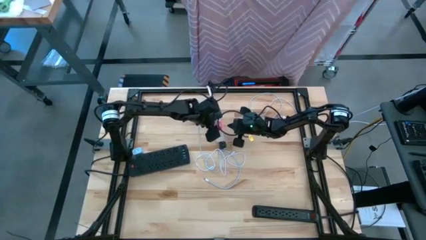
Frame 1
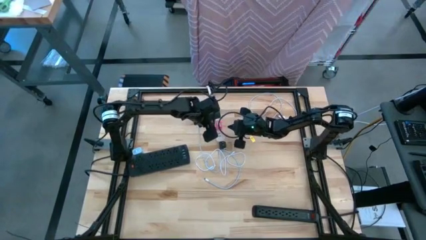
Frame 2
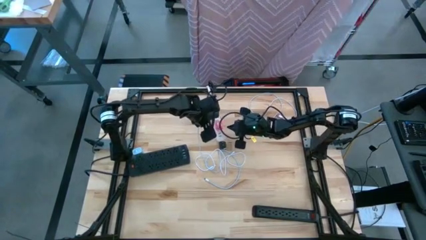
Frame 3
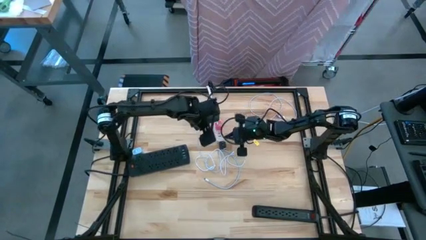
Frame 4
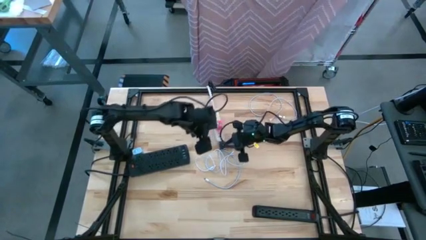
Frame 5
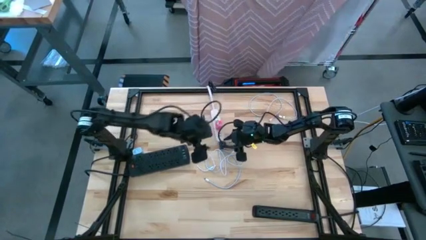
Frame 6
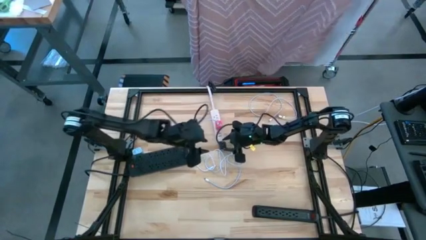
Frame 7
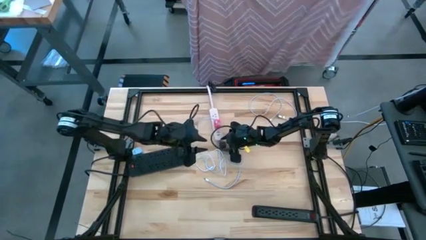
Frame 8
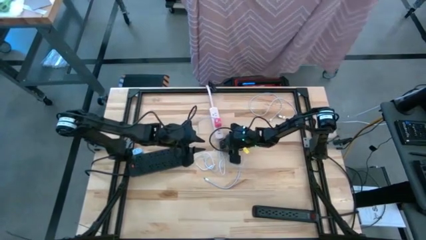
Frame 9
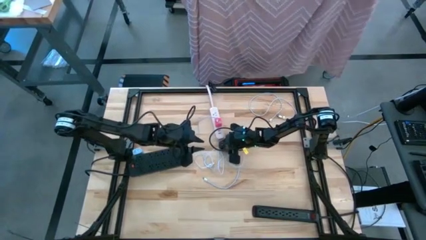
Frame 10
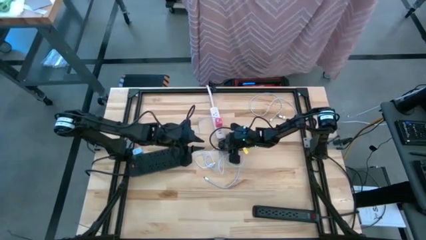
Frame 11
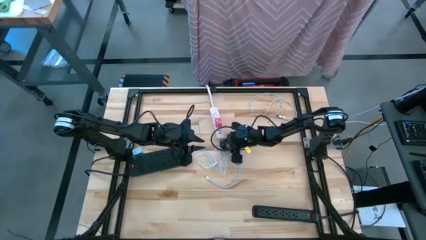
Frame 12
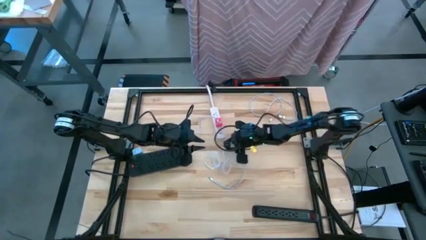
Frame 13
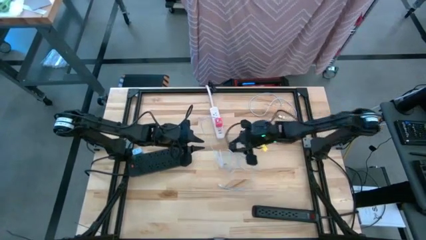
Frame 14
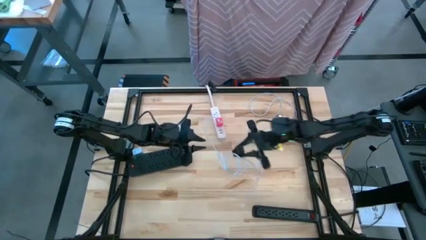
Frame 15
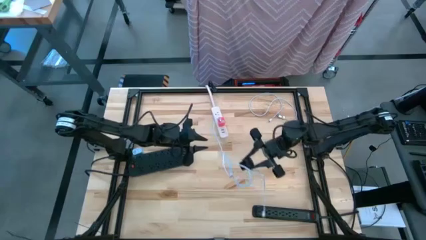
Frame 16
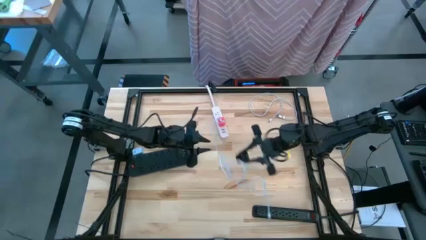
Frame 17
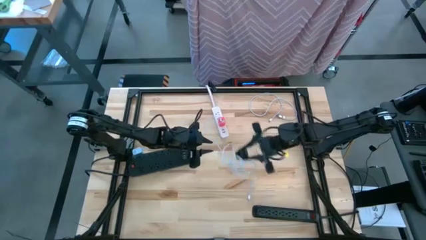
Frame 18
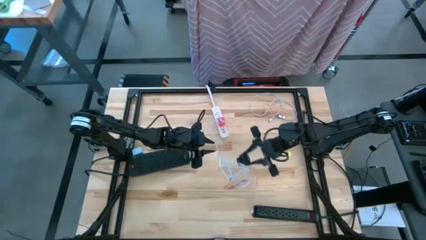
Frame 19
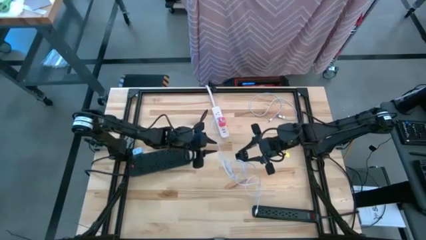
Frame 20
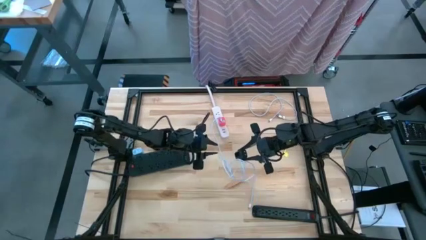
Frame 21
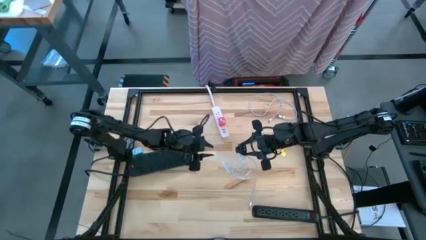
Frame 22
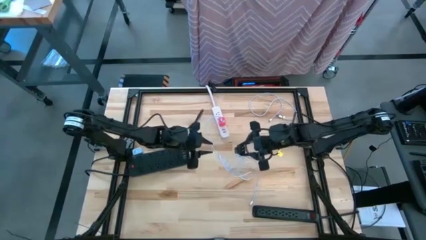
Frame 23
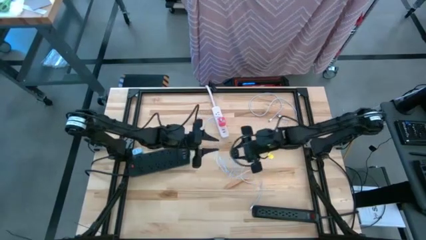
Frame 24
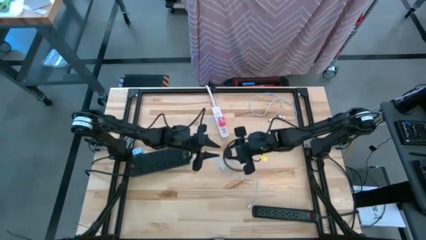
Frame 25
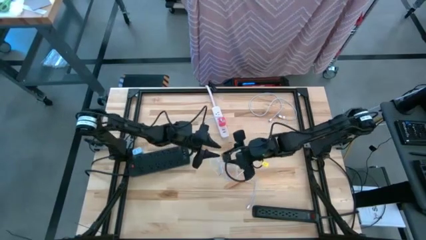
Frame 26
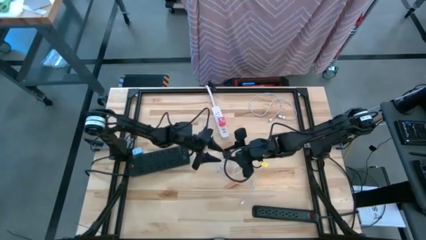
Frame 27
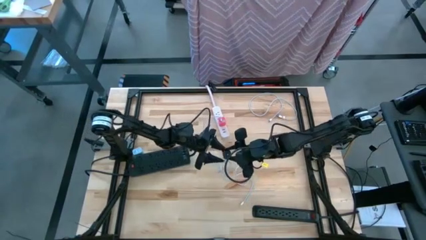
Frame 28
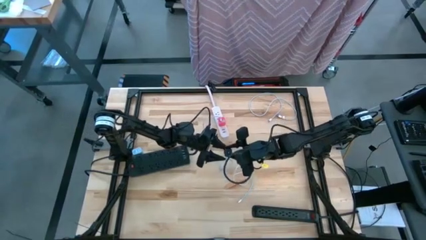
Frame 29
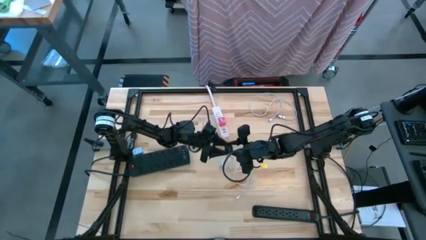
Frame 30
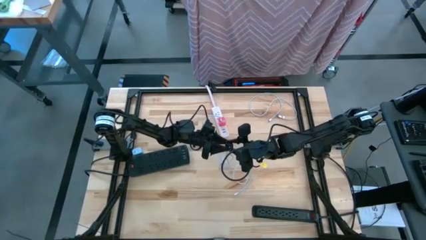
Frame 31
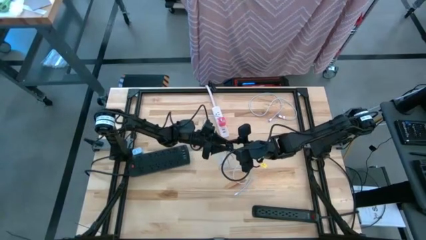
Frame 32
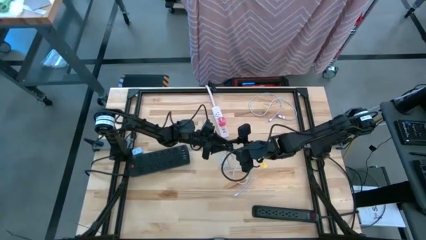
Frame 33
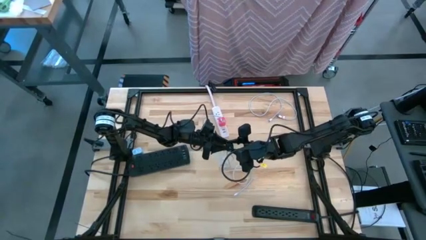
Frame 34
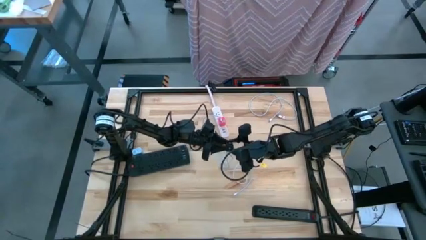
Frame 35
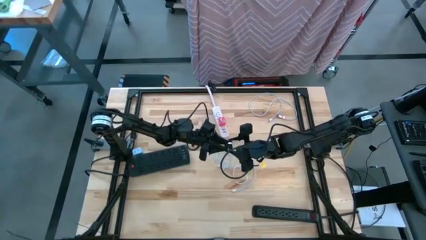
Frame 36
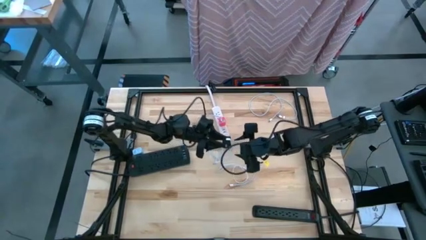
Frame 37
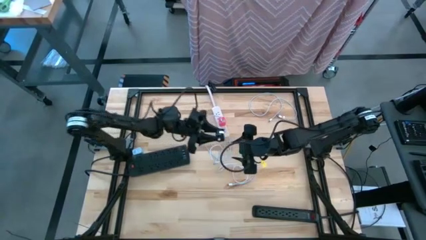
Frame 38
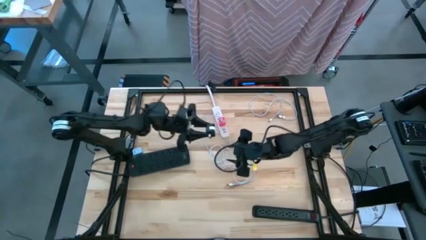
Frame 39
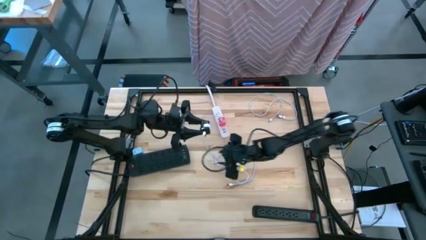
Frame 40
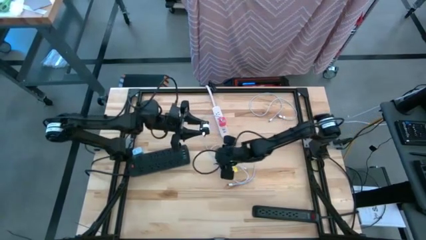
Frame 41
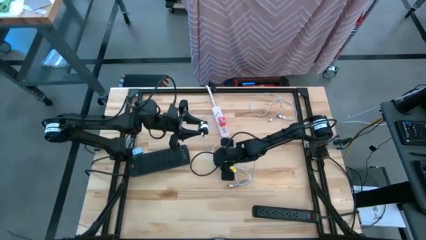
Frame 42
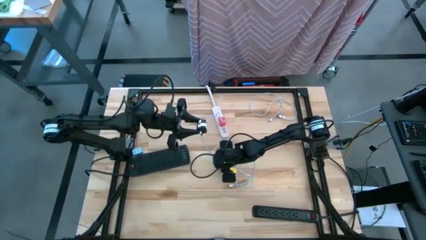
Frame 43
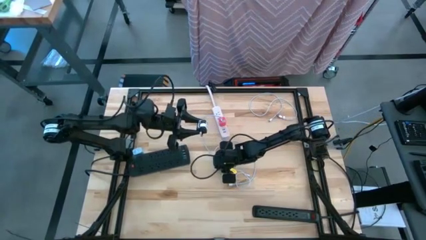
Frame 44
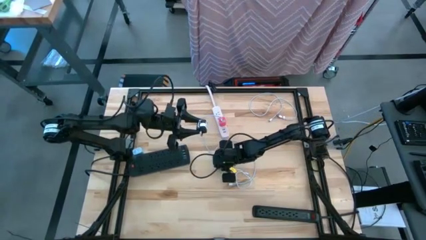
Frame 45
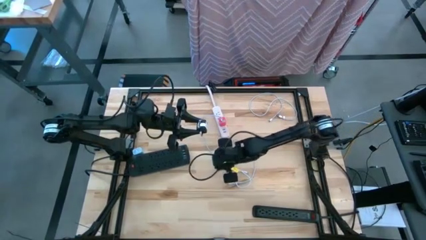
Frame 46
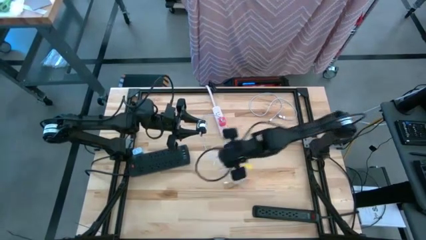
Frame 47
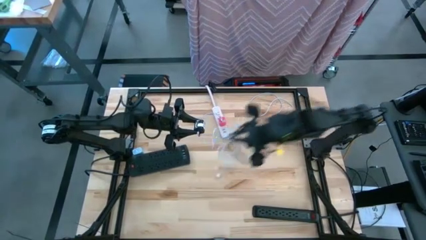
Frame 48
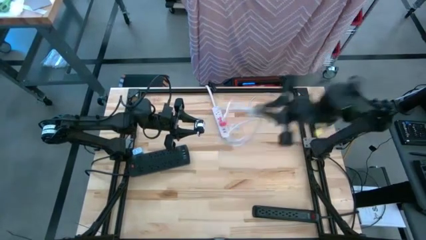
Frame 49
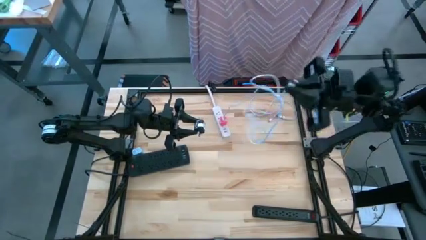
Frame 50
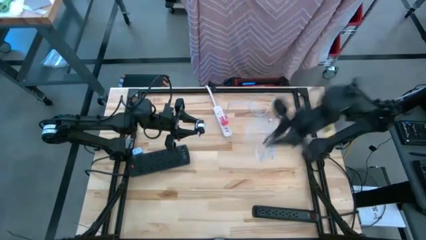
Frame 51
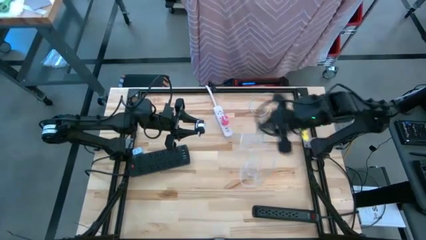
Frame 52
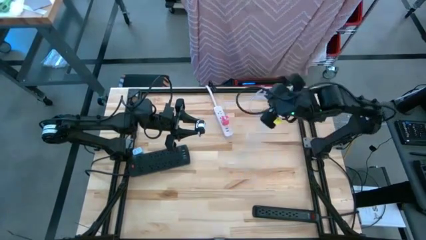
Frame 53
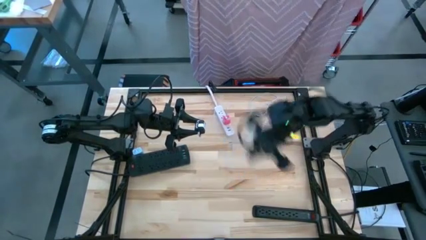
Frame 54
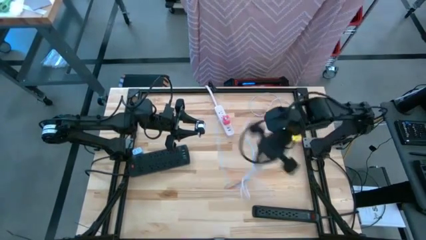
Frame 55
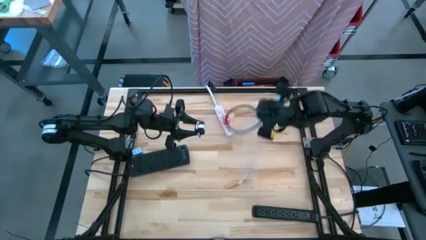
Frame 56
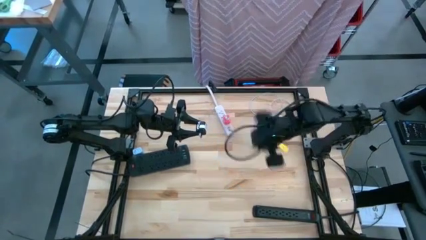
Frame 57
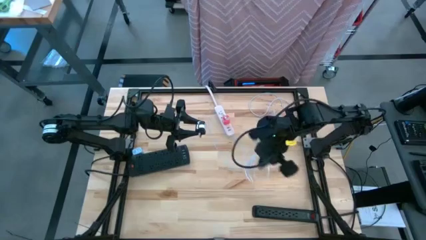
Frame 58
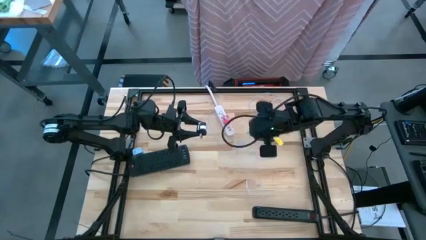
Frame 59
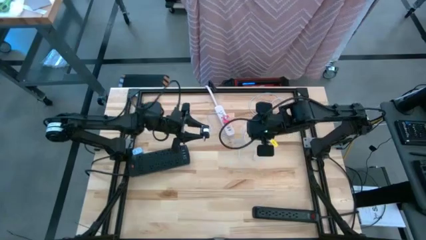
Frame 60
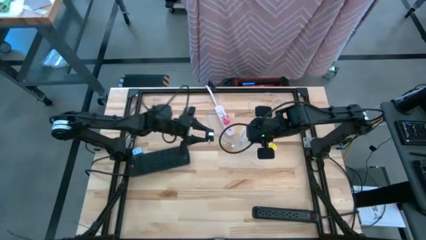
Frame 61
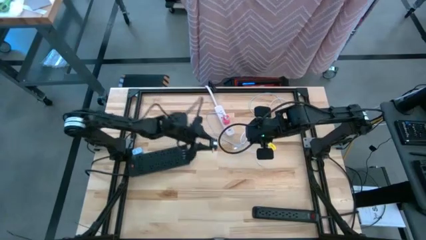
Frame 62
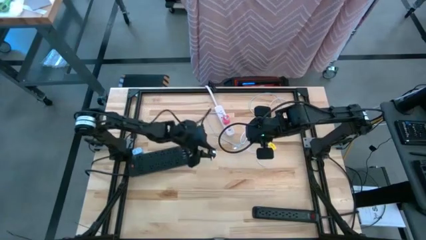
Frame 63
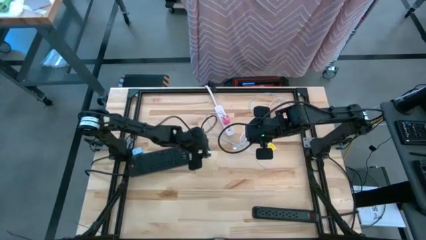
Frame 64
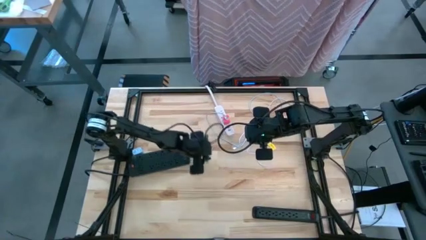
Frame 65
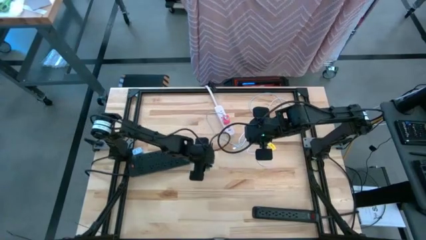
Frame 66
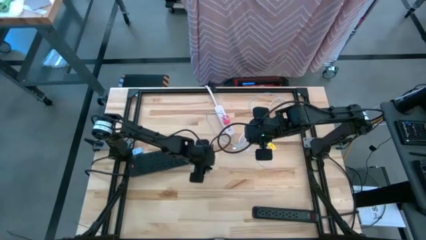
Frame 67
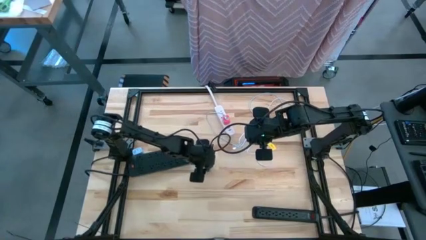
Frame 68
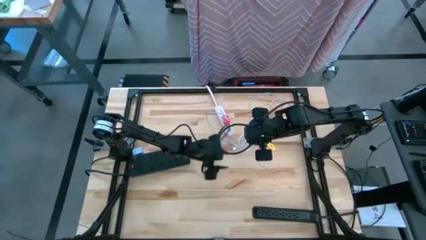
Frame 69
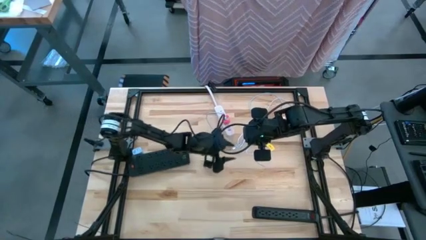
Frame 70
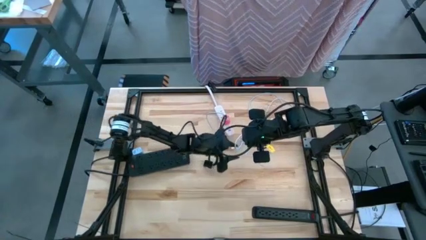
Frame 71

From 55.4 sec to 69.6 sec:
Task: Insert USB
Insert the white bottom charger cable to the black charger adapter

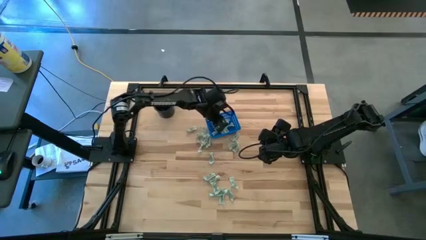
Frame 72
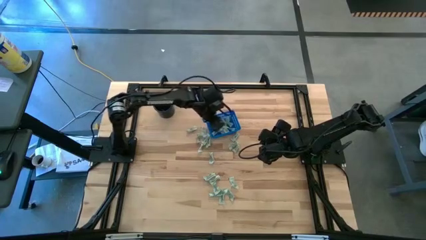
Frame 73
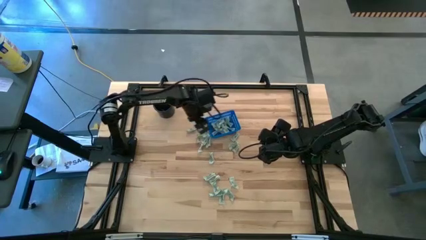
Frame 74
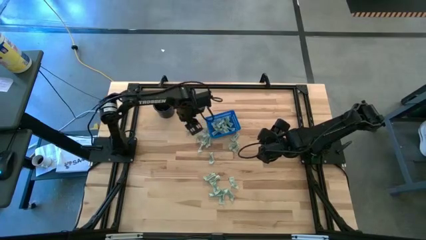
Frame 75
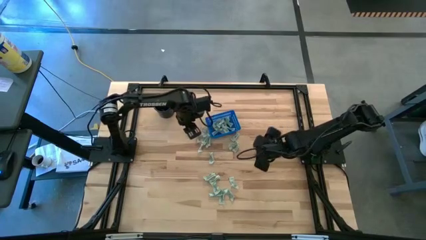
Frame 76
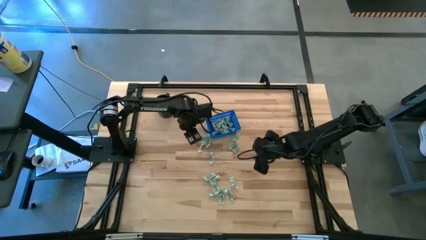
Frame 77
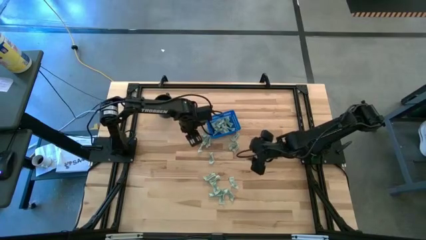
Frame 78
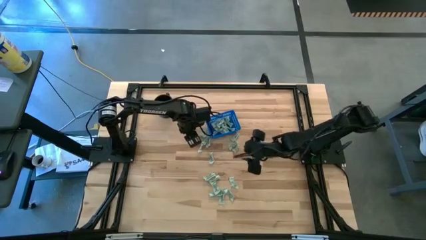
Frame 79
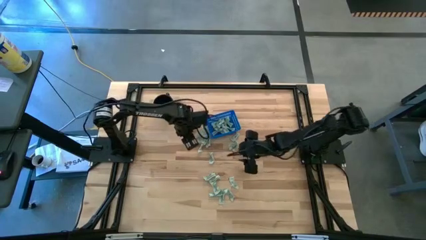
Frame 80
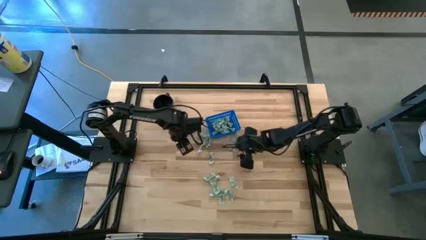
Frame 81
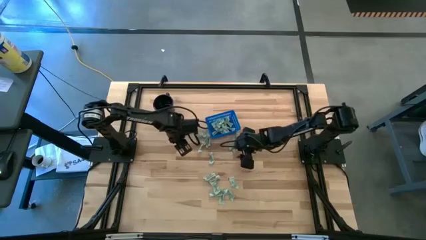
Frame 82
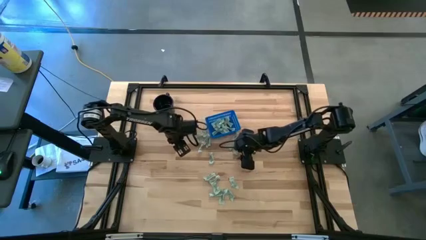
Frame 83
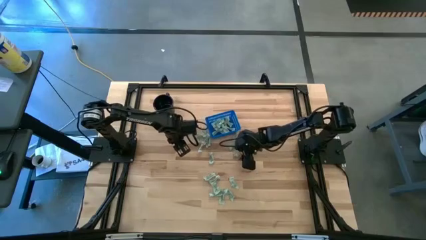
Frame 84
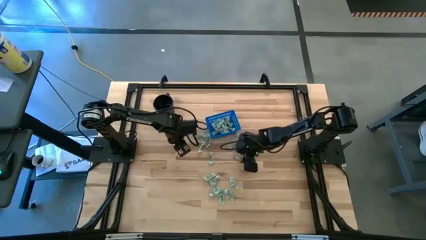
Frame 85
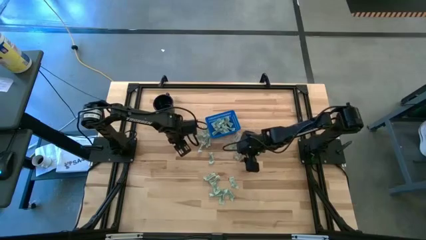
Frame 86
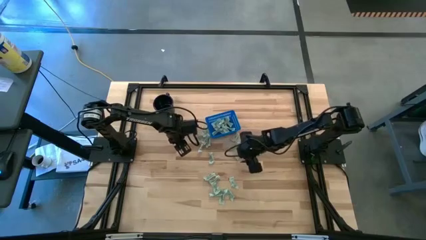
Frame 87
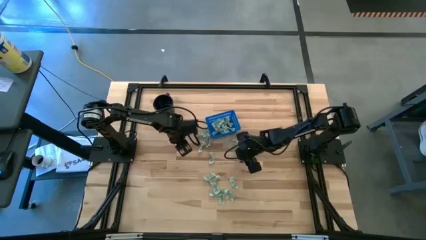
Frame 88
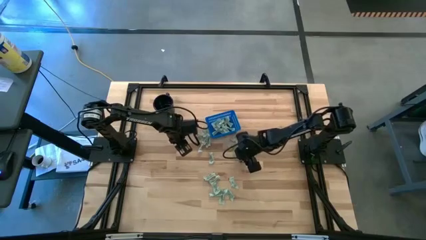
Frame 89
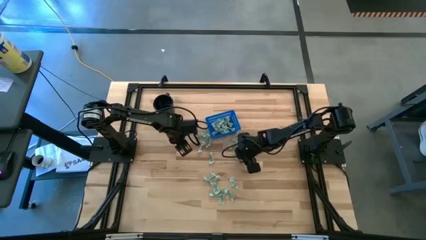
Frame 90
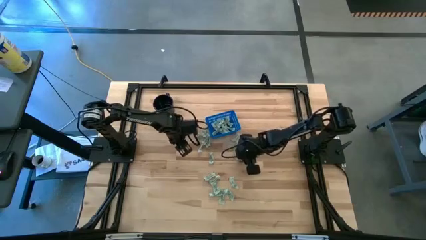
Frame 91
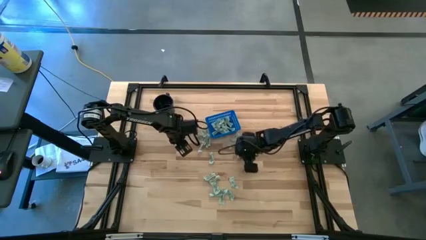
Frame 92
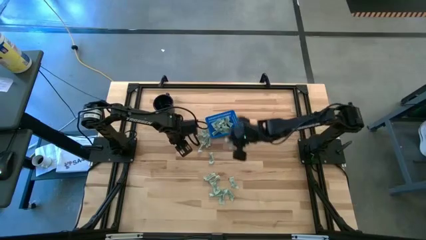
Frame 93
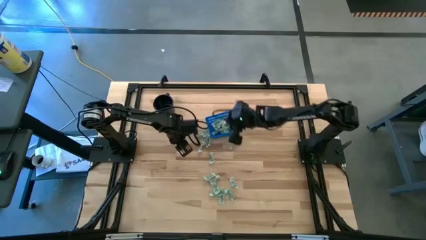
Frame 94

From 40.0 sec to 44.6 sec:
Task: Pick and place Stevia / Truvia into bins
Put the green stevia packet into the blue bin
